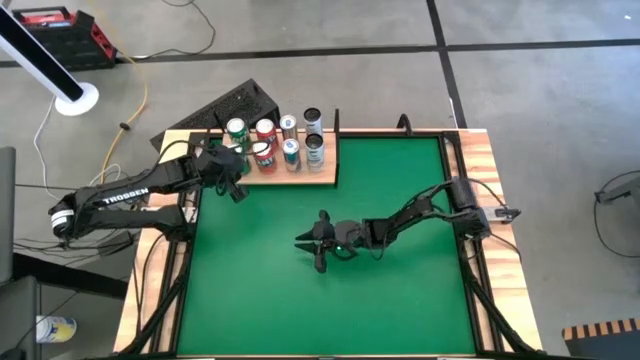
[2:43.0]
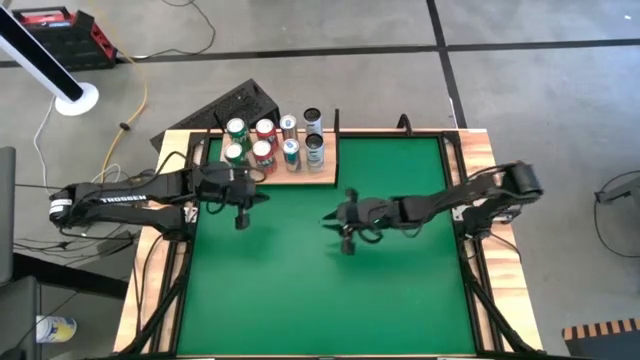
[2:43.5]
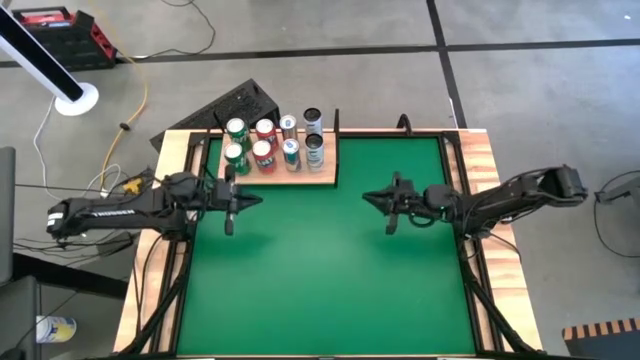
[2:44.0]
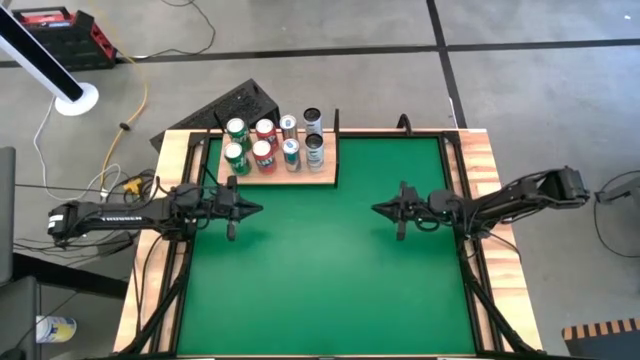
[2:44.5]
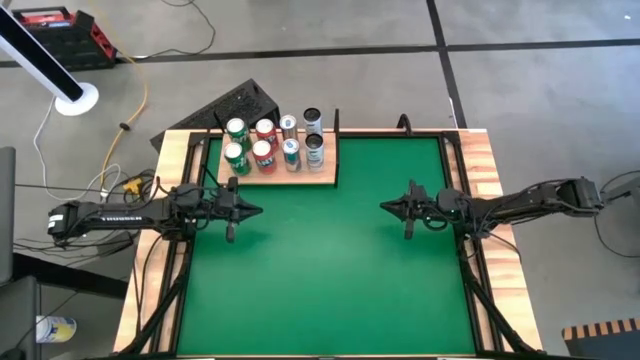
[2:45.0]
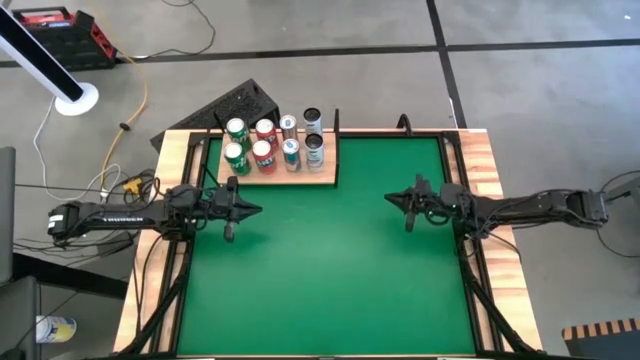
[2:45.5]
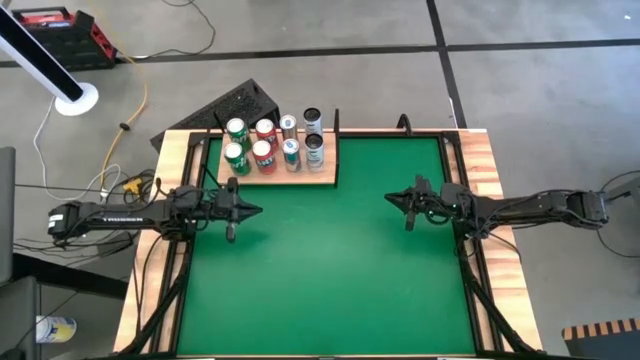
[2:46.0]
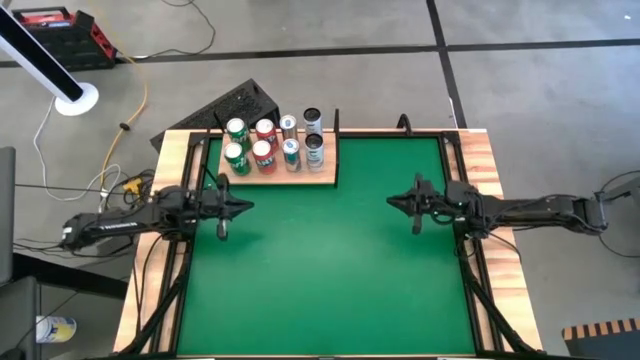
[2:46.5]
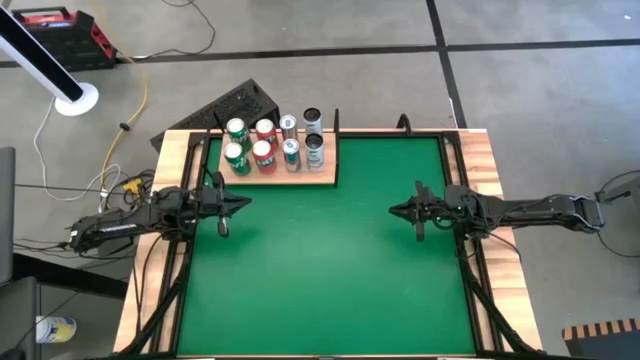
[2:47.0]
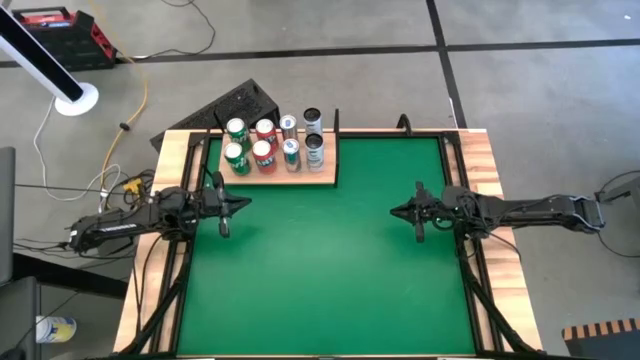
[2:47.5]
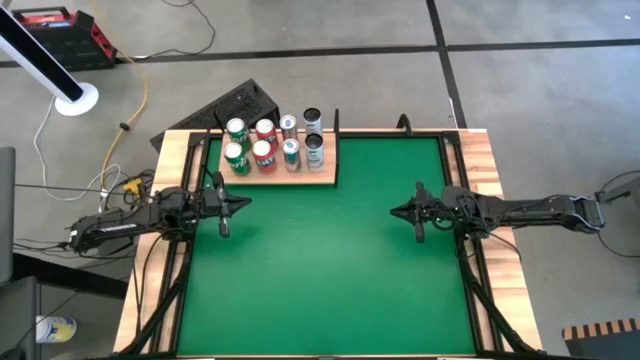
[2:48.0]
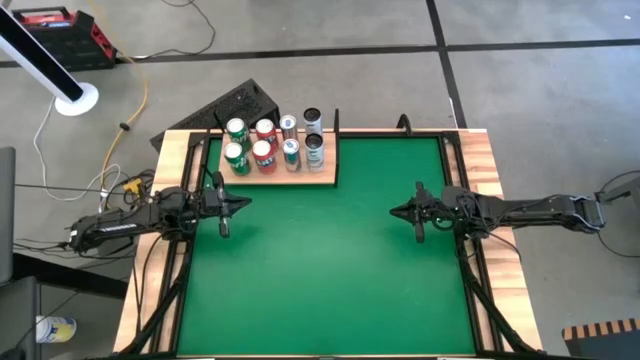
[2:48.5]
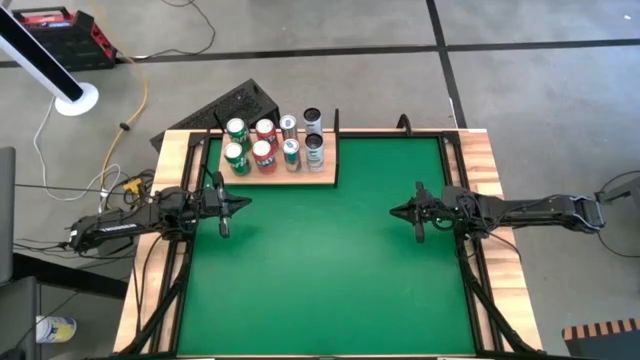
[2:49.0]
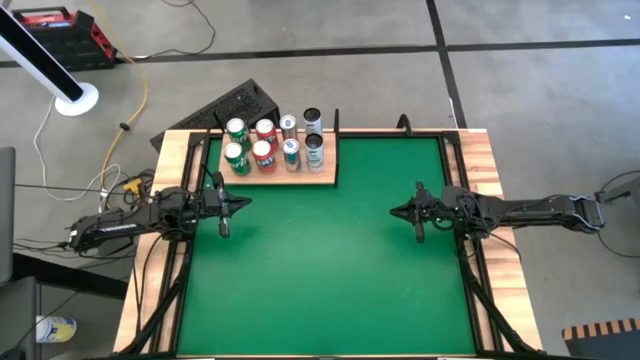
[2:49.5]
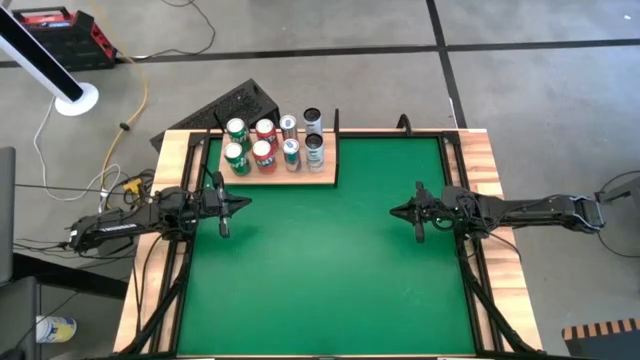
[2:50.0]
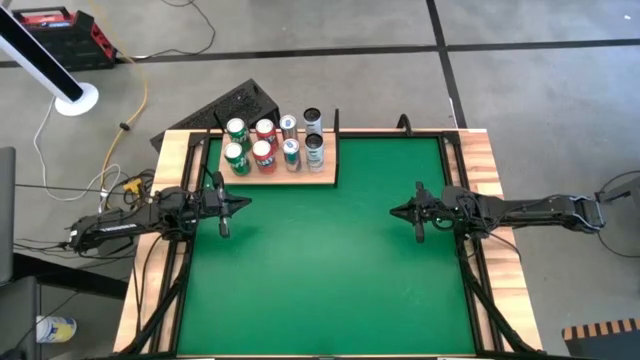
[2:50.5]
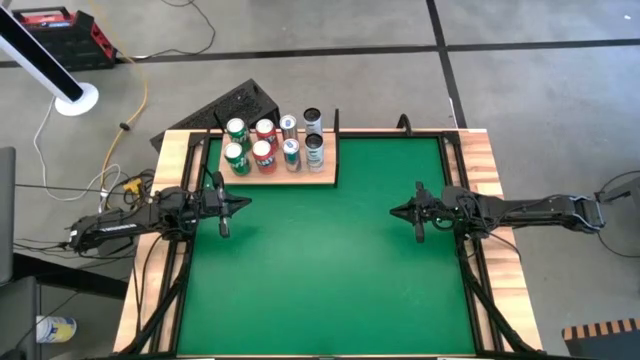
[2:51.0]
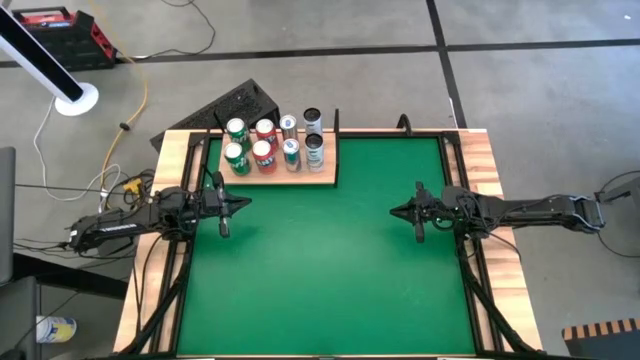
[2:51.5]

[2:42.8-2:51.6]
Task: Place canned beverage on shelf
Return to Home Position

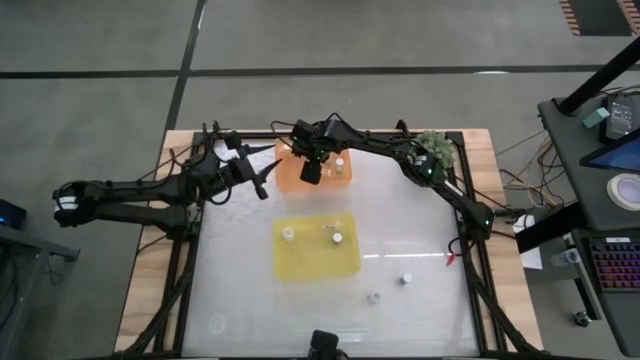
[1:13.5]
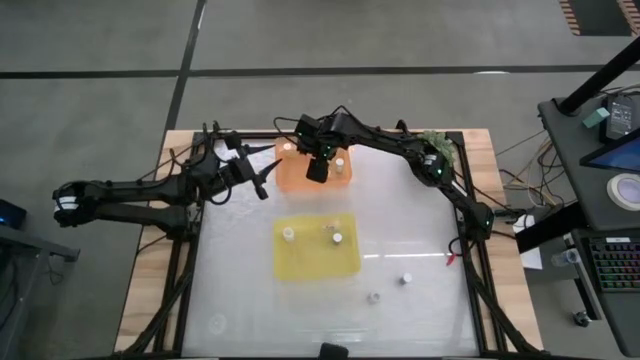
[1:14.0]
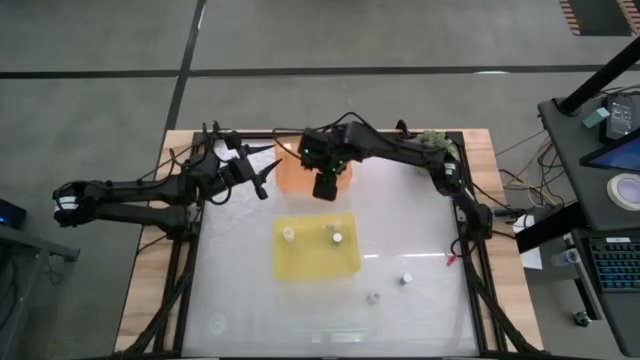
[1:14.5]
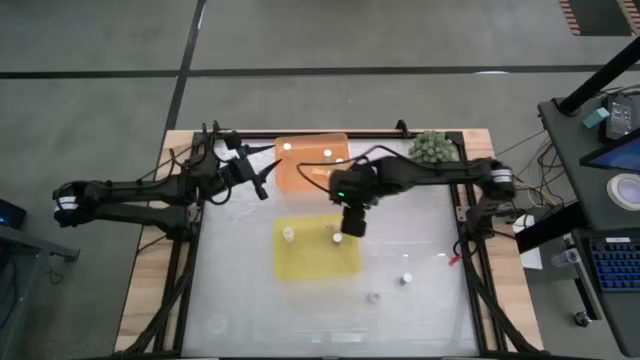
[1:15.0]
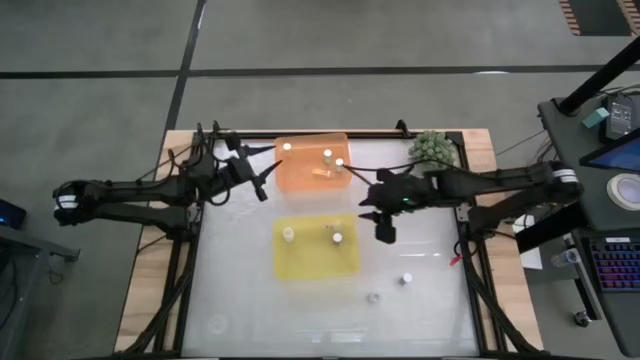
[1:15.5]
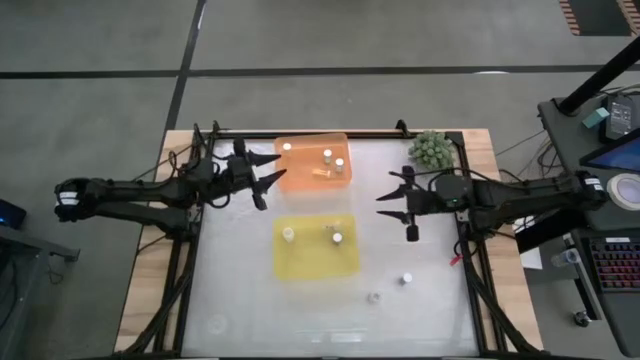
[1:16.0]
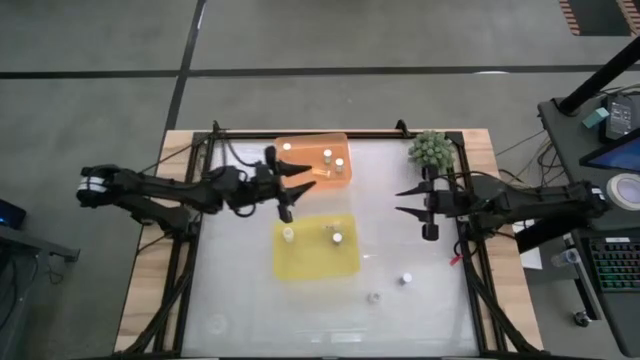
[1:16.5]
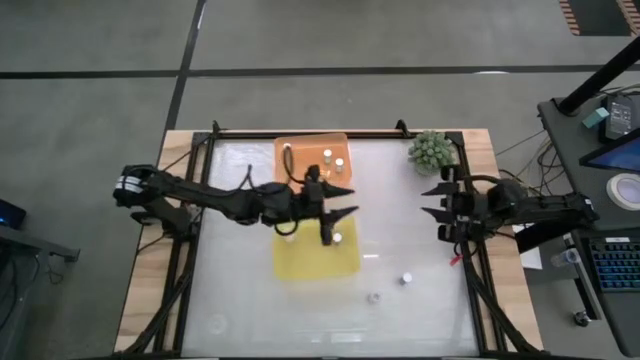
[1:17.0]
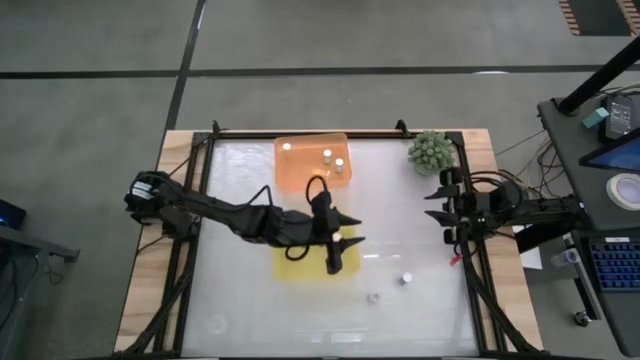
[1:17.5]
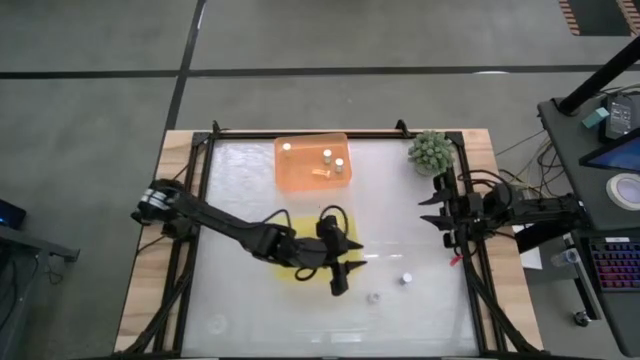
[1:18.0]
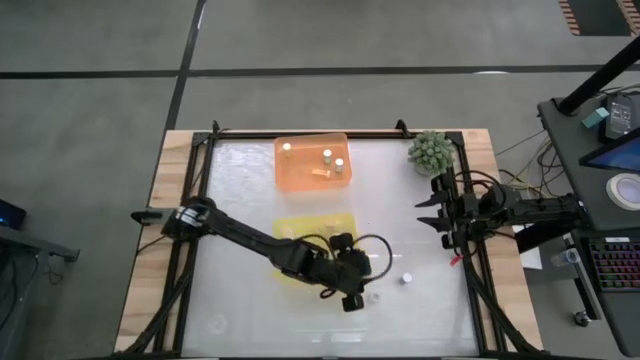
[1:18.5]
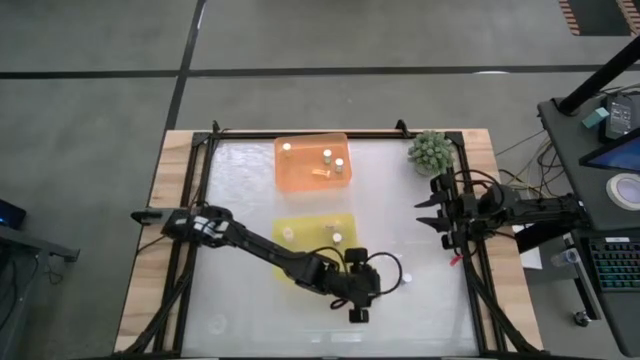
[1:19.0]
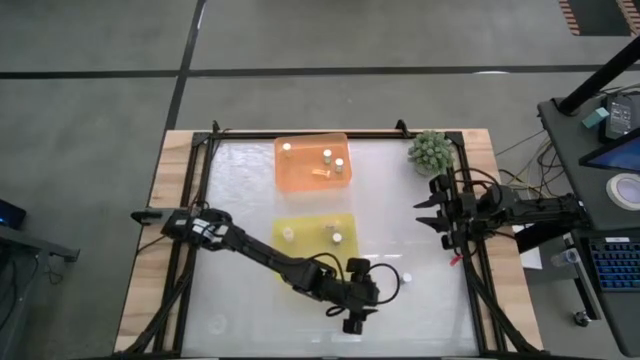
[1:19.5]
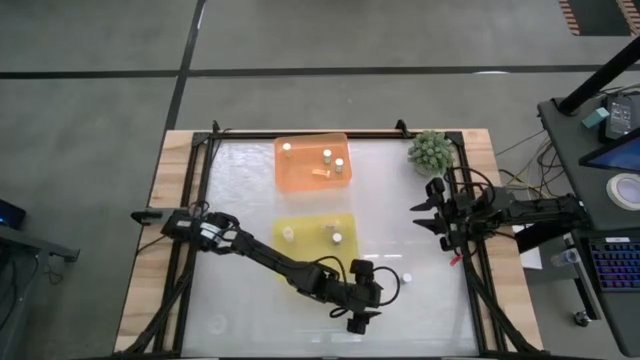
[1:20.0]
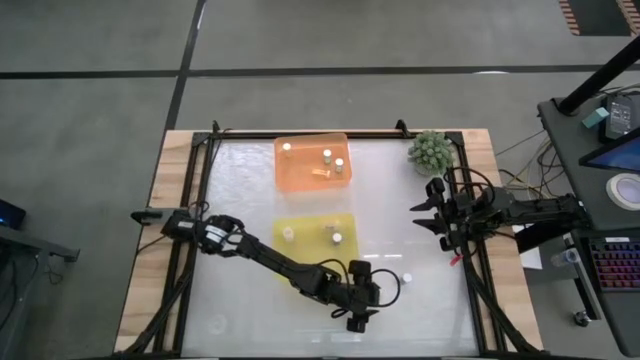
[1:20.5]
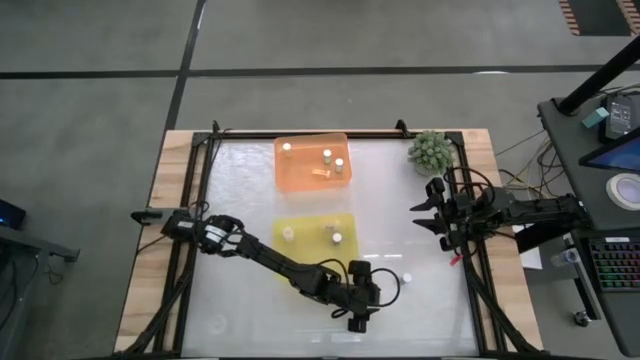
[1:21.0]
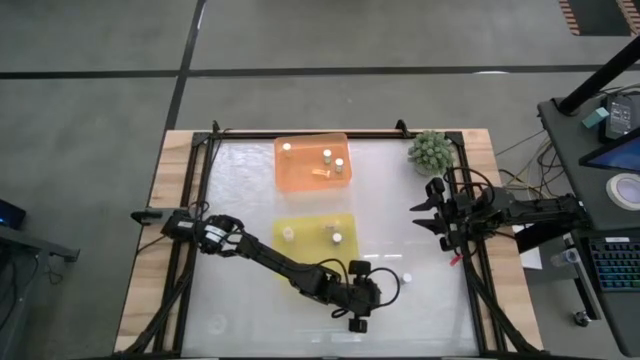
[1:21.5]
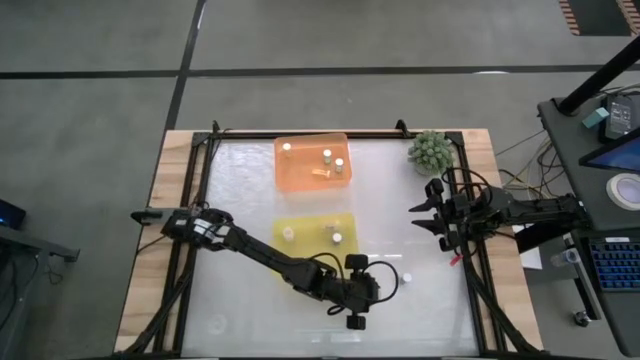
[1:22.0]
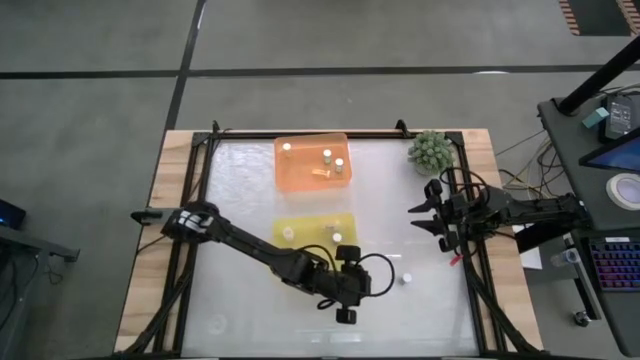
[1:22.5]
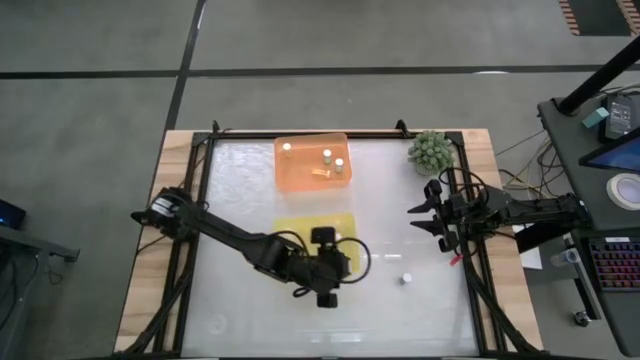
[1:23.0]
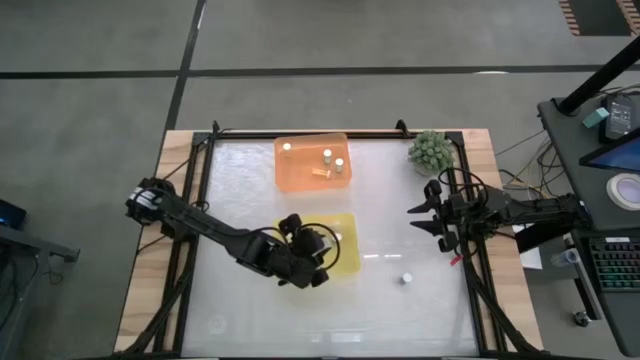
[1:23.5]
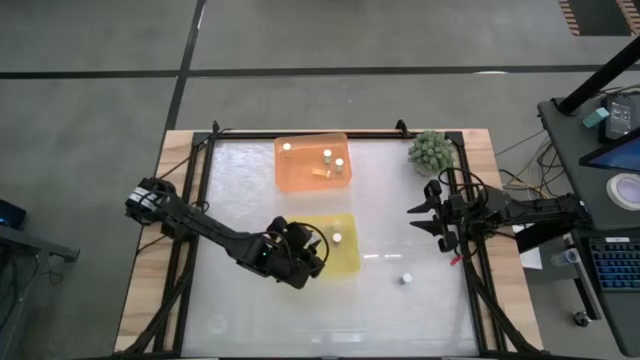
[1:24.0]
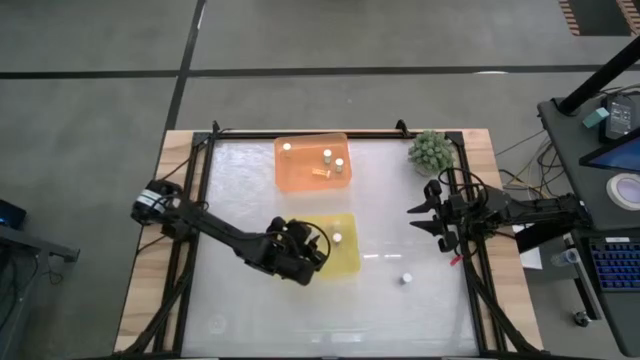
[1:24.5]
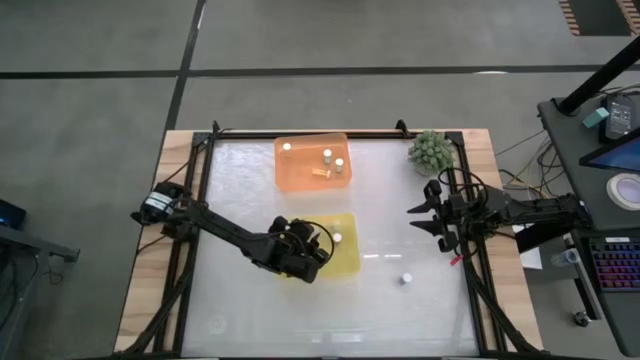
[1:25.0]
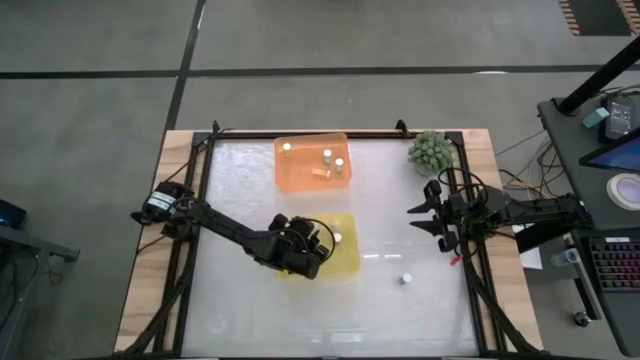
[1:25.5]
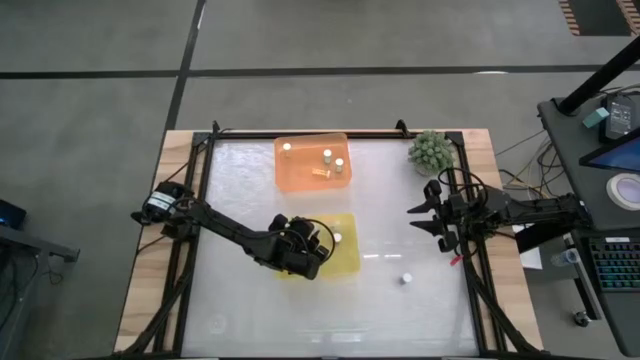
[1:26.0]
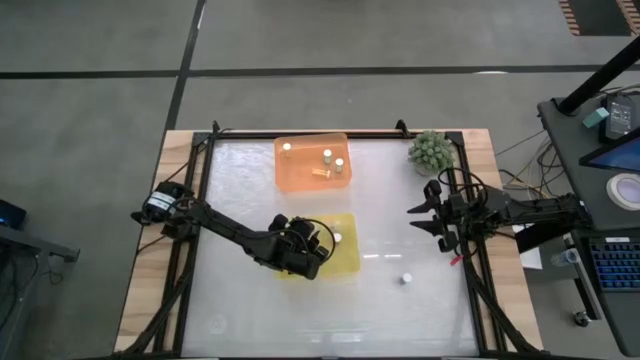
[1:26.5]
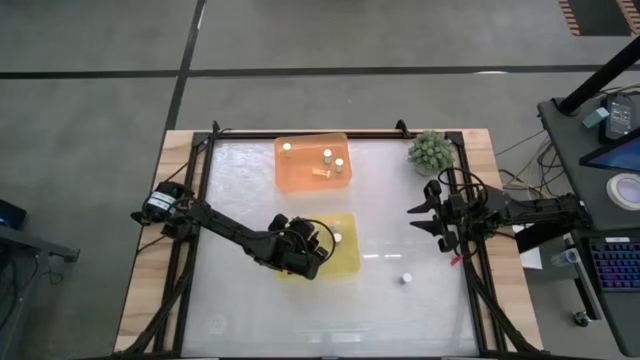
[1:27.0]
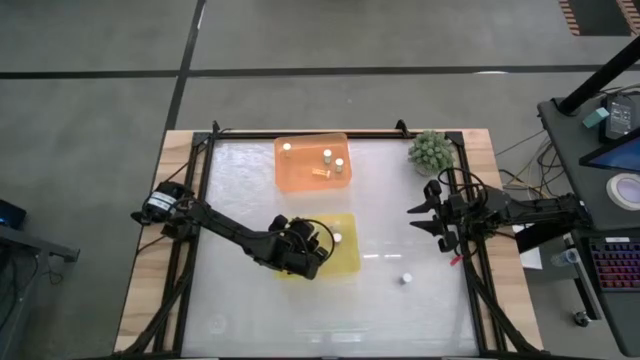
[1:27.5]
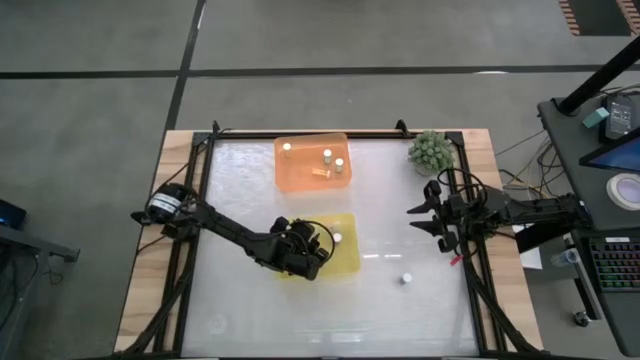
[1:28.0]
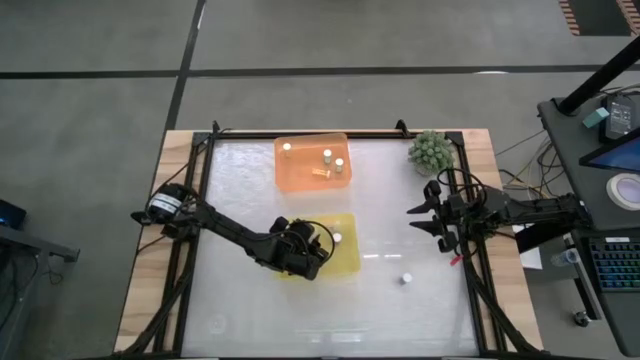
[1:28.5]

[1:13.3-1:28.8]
Task: Pick and place medicine bottles into bin by pill shape (circle, oval)
Put the transparent capsule bottle into the yellow bin
